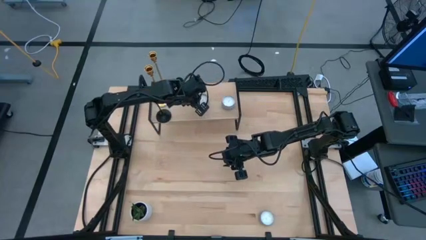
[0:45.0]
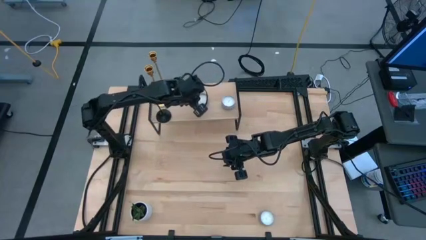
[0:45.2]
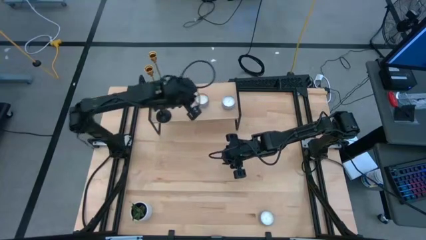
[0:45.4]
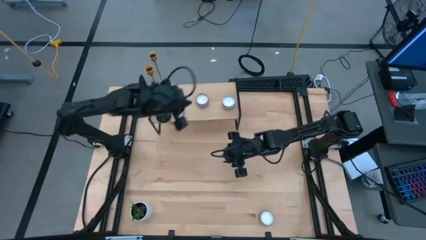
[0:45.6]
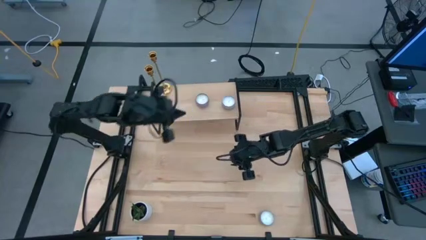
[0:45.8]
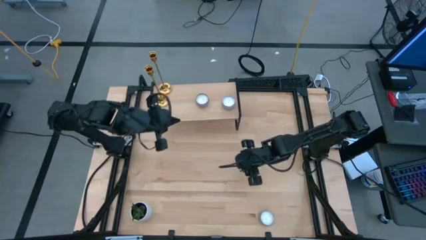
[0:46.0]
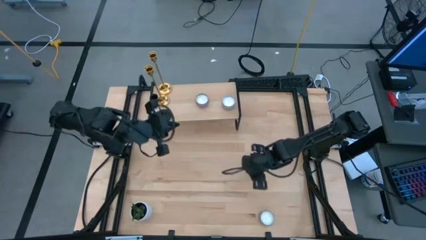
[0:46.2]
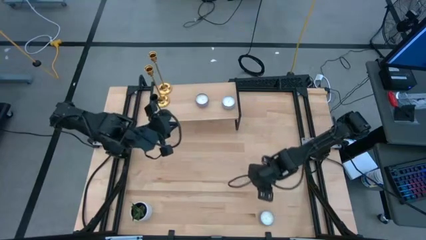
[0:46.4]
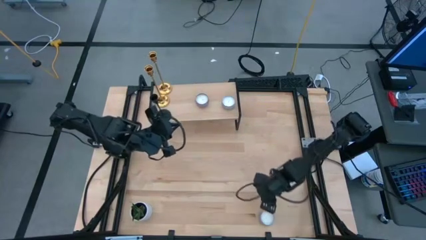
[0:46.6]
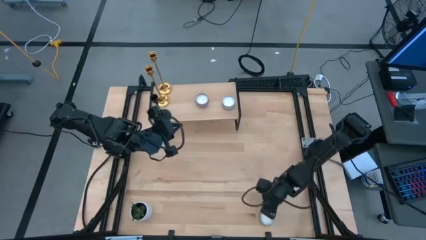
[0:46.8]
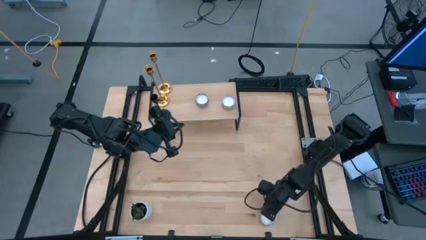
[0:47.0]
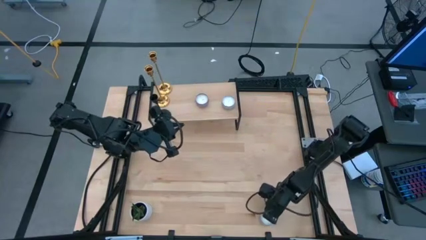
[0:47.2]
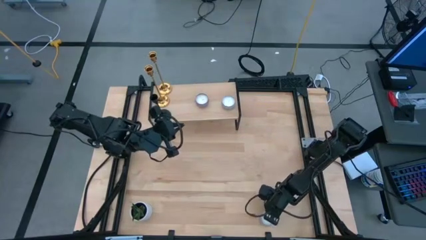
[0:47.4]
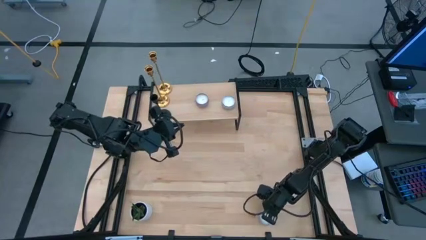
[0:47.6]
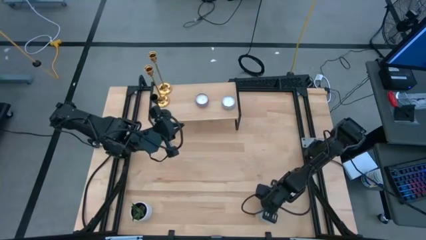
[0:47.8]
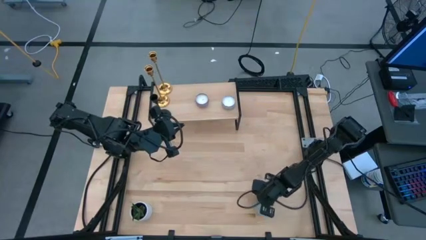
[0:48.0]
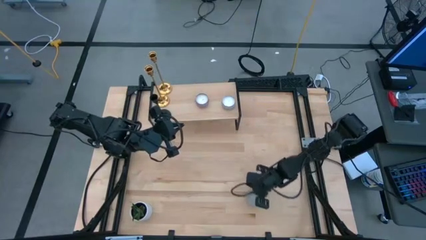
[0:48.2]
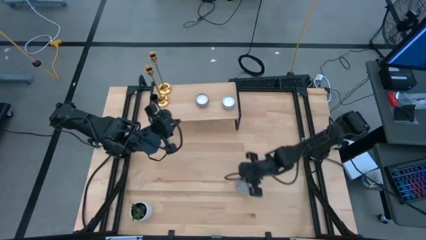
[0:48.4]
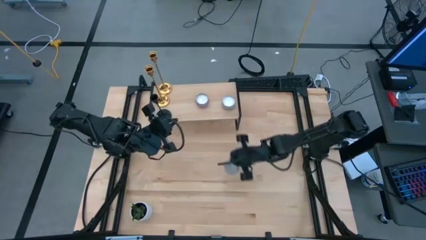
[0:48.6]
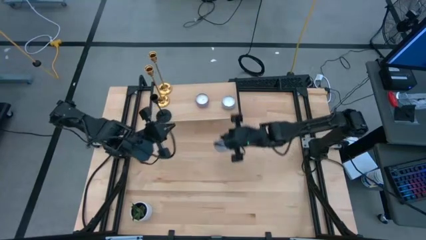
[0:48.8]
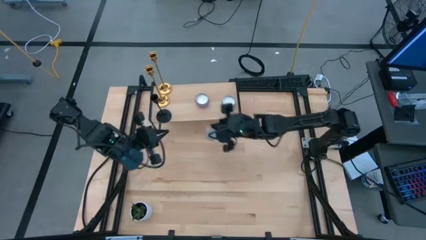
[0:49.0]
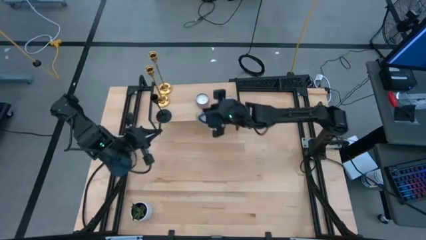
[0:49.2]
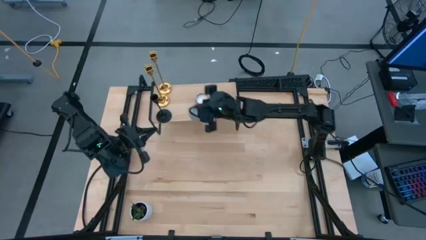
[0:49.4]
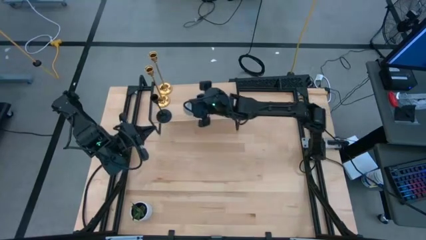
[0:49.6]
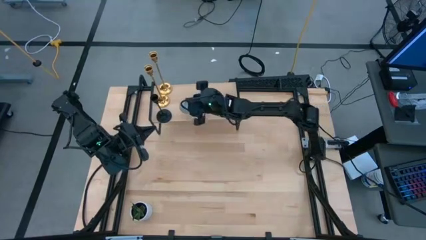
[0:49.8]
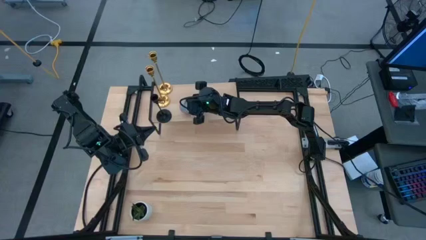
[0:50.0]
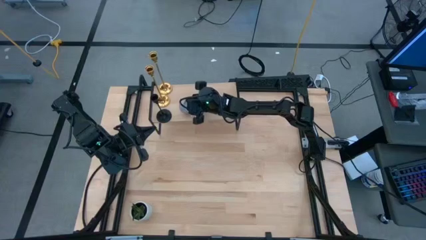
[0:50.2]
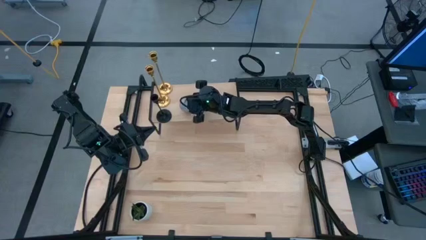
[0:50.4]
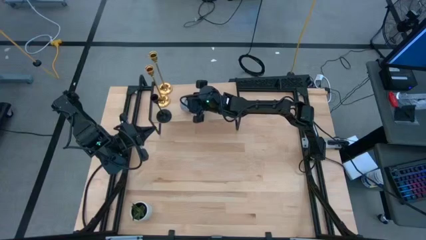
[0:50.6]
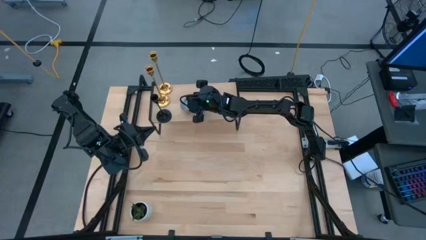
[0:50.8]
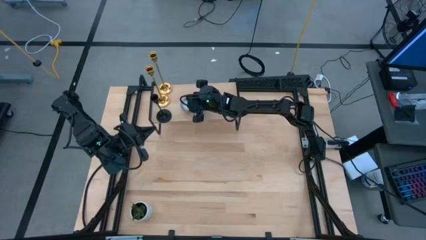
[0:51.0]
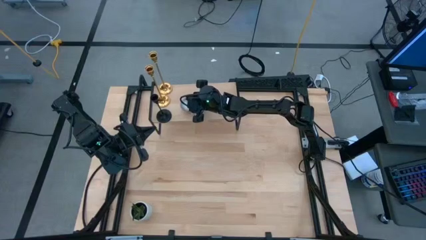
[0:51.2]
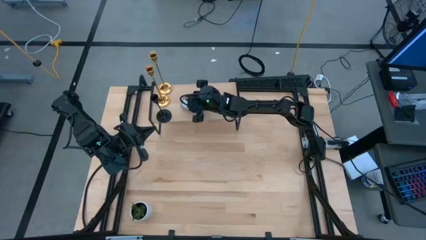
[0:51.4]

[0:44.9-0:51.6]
Task: Pick & Place candle stick holders
Put the blue white candle bottle on the shelf

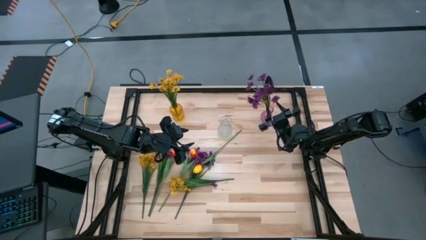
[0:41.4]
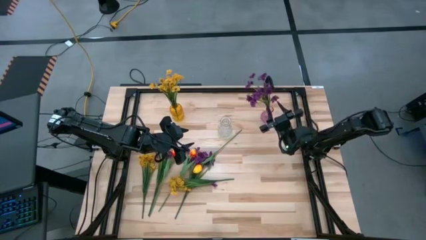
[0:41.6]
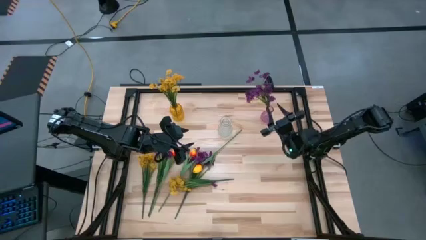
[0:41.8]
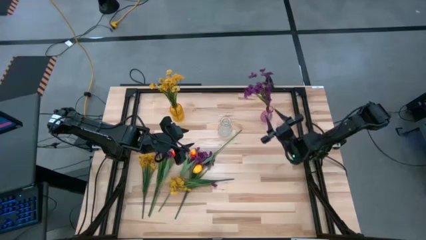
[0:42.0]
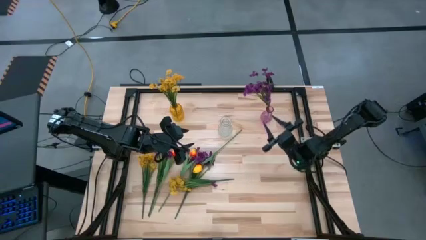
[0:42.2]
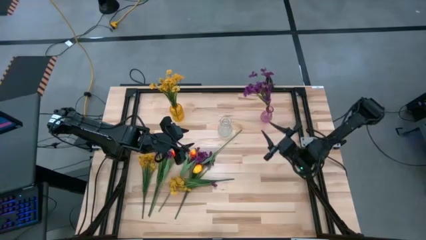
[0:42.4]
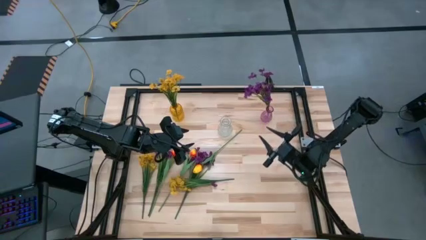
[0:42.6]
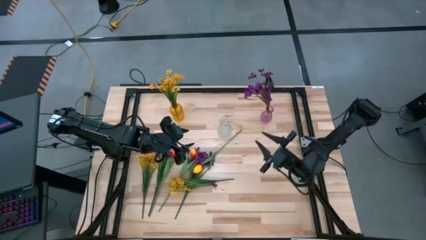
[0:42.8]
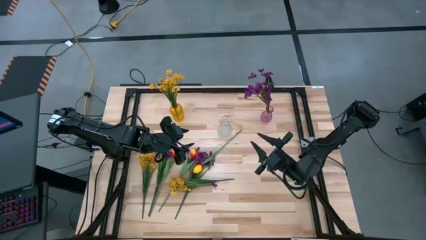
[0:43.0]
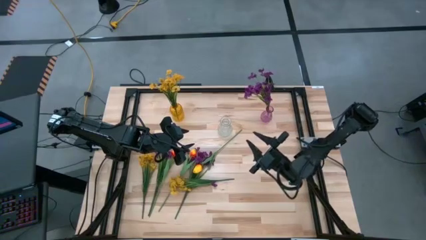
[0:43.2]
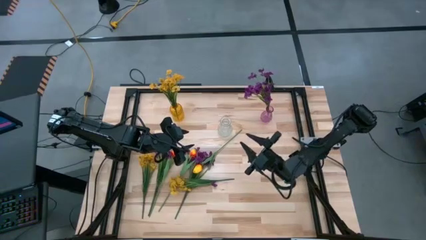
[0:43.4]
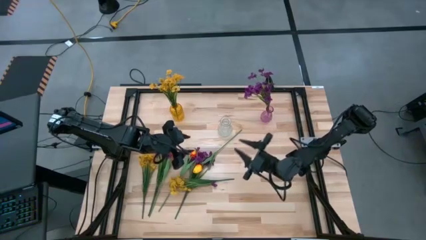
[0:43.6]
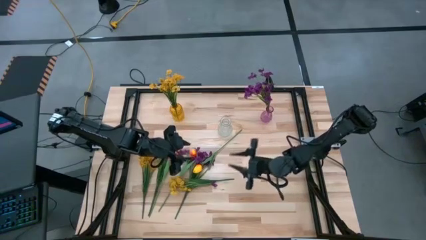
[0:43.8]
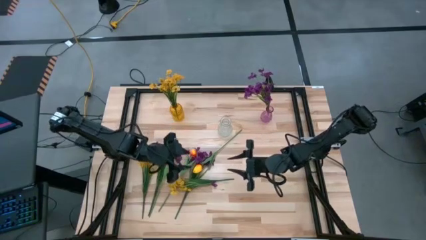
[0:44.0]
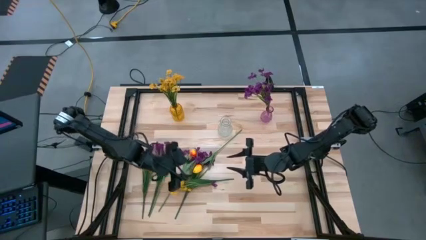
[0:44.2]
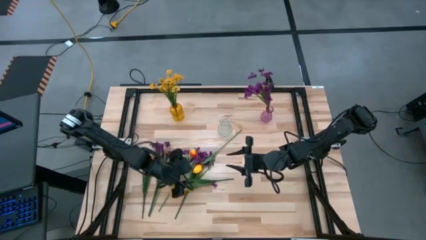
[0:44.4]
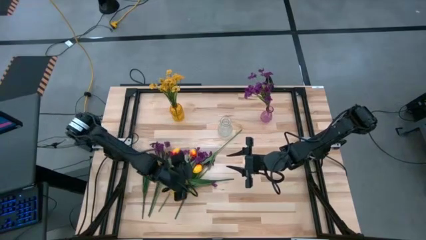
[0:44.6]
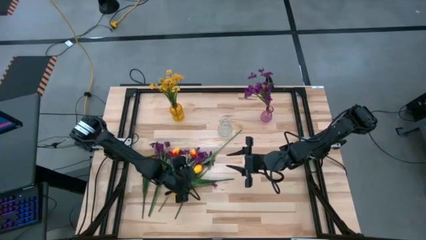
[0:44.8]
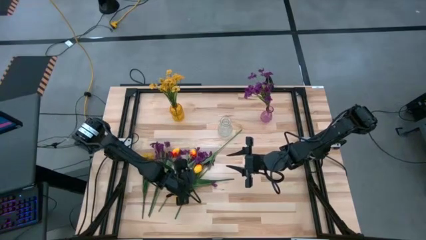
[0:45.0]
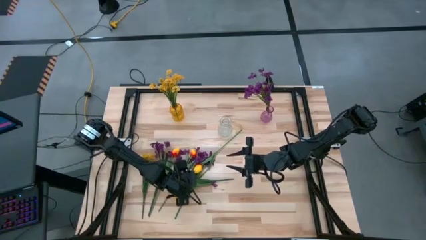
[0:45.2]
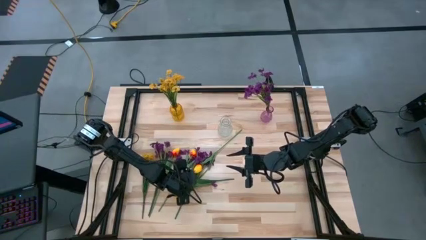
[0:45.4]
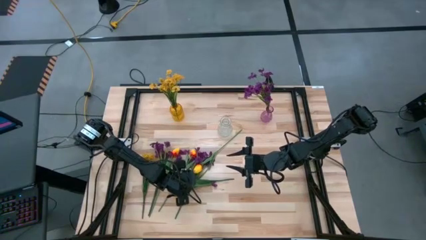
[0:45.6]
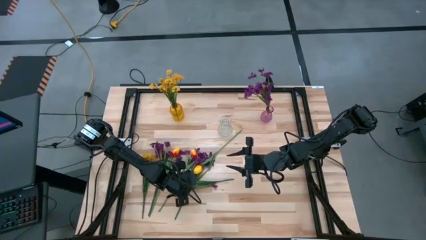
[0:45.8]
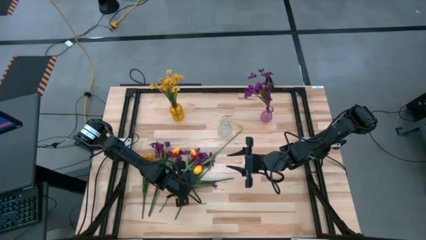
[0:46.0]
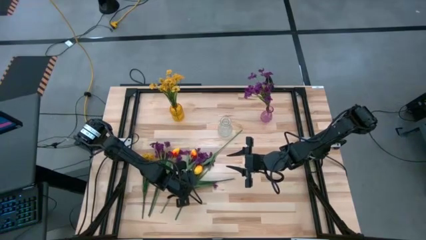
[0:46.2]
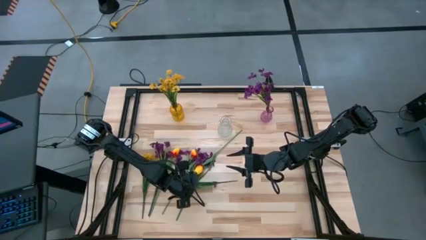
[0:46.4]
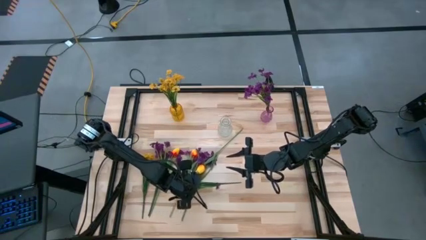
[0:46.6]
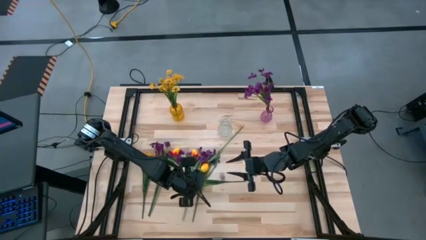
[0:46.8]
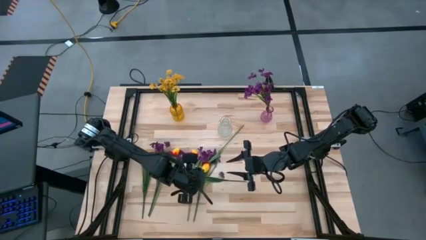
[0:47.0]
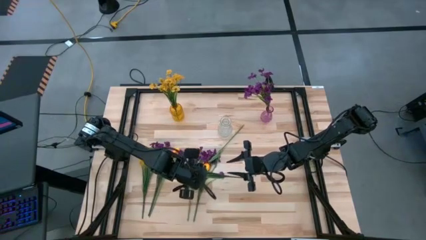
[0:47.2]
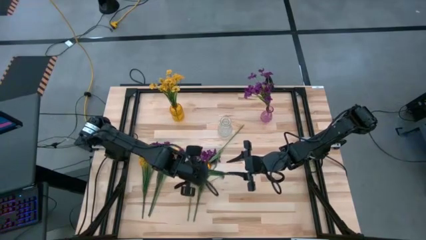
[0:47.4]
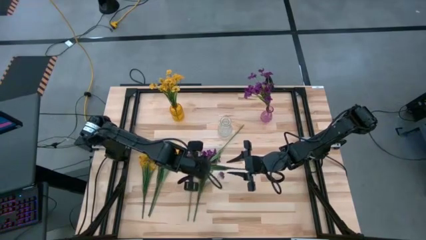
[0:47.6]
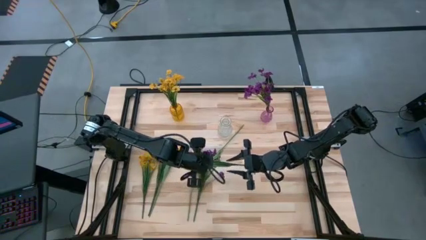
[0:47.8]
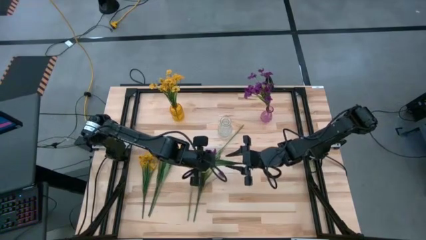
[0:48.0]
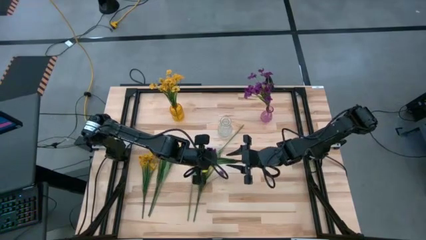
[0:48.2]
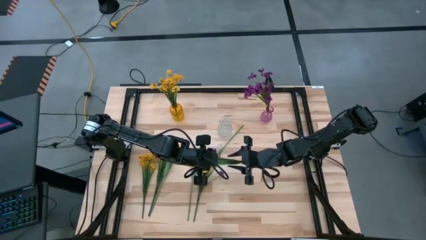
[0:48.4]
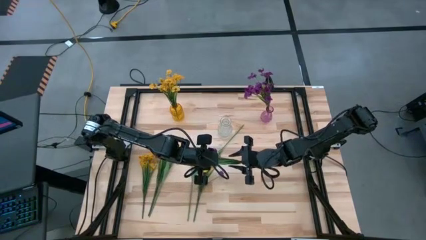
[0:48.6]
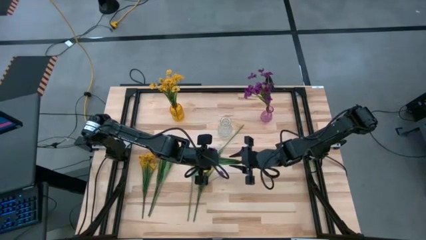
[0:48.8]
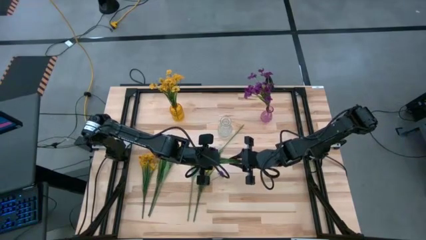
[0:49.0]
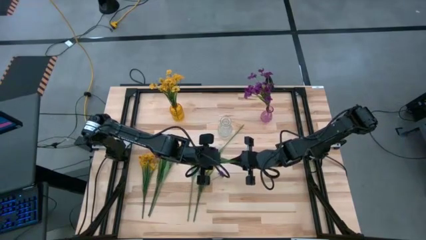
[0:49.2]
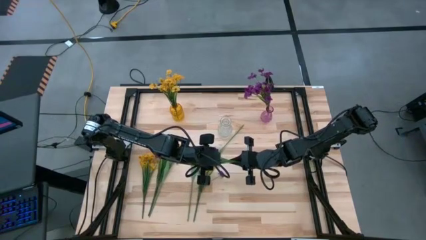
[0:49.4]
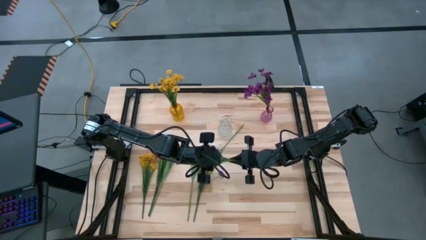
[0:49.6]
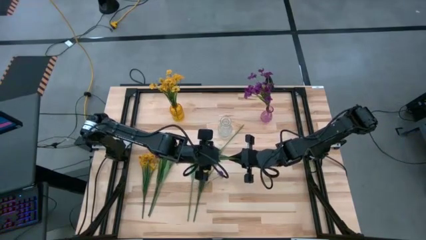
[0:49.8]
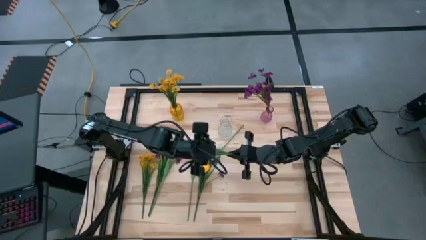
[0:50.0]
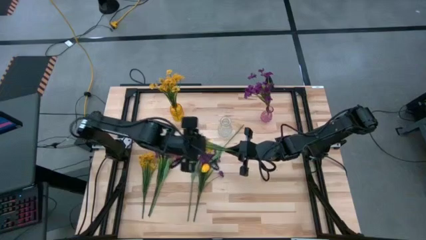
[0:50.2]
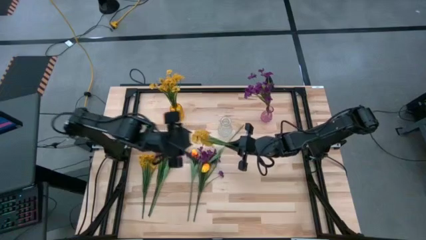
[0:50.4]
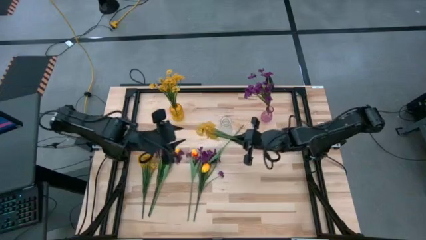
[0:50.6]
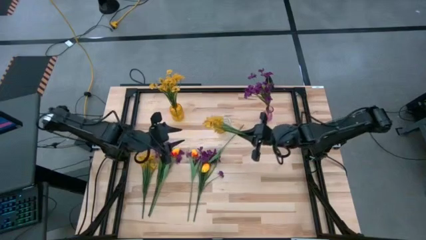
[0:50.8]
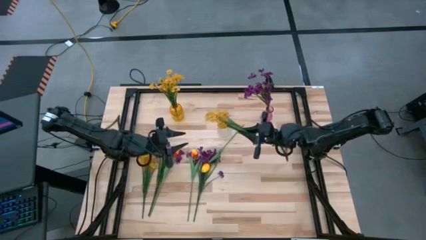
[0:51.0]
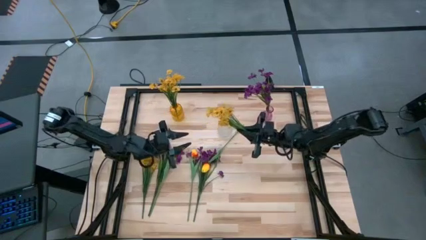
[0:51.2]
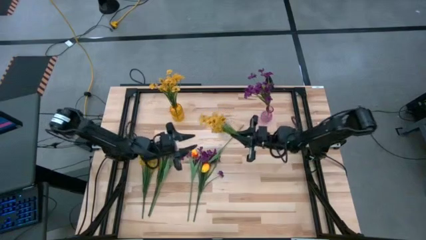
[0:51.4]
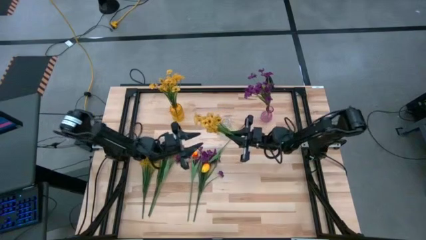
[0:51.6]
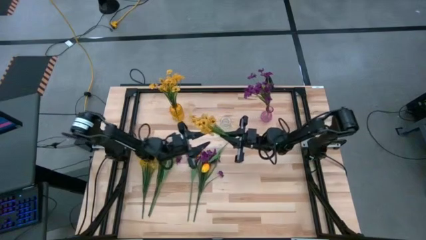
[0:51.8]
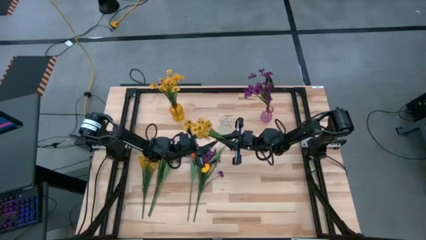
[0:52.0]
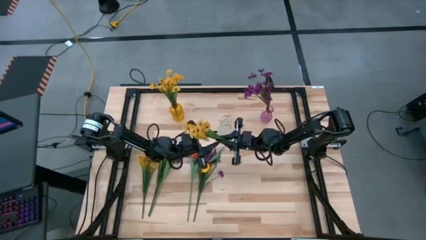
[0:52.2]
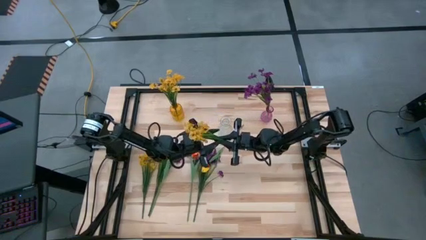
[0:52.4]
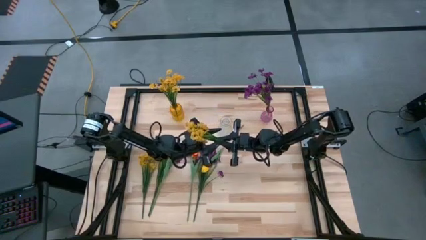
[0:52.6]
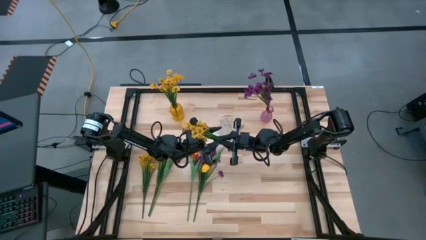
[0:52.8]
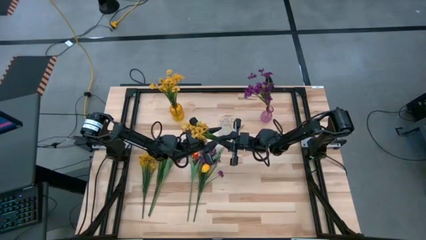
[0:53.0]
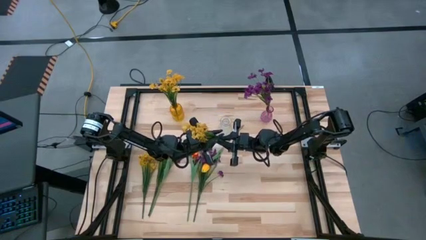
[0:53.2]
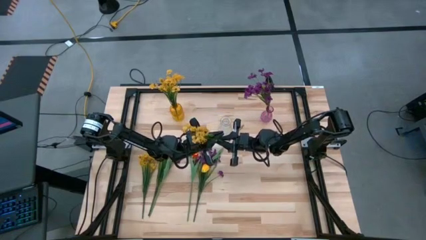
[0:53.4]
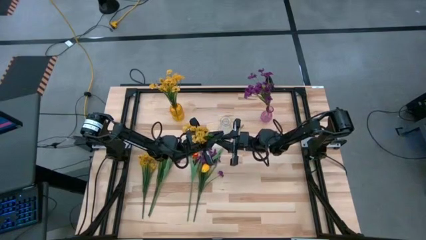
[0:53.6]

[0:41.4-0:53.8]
Task: Sort flowers into vase by color
Put the yellow flowers into the yellow vase
